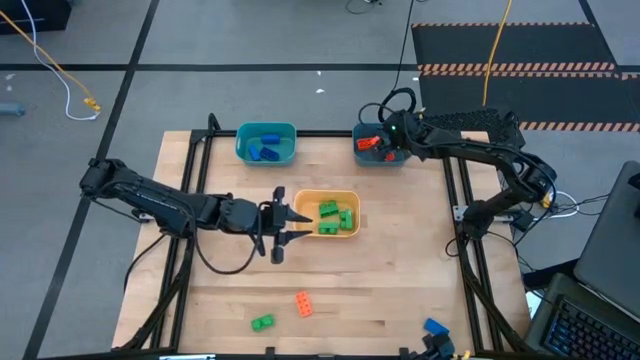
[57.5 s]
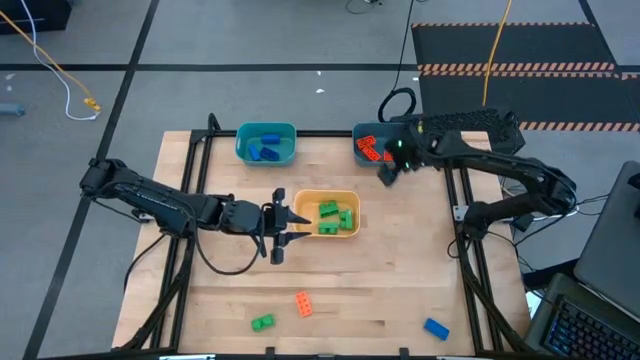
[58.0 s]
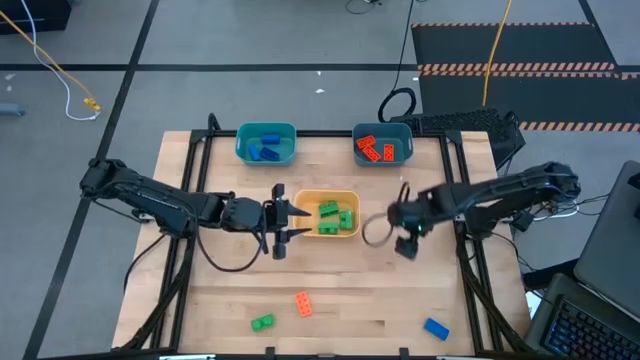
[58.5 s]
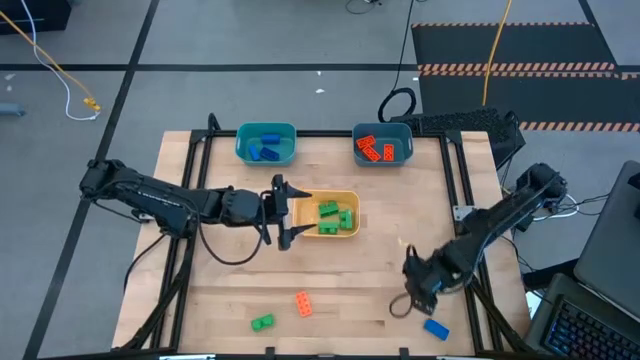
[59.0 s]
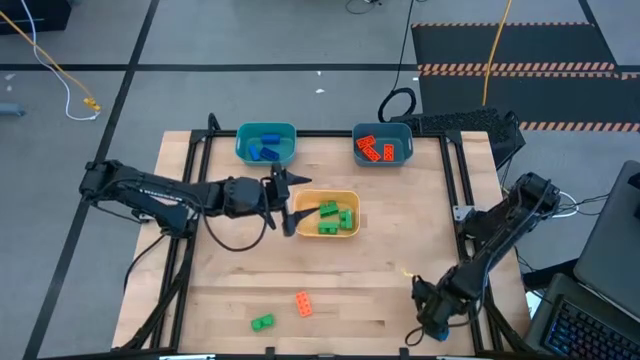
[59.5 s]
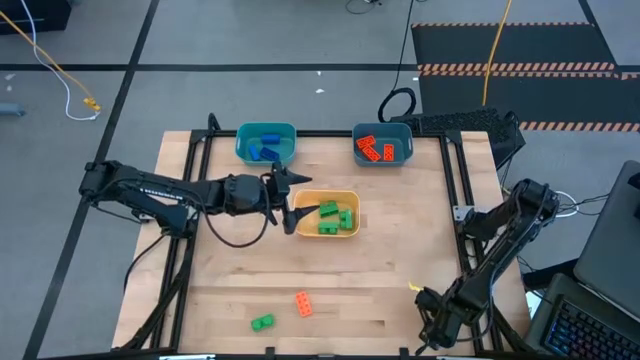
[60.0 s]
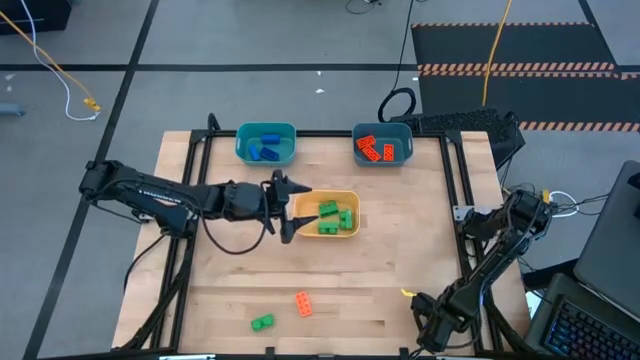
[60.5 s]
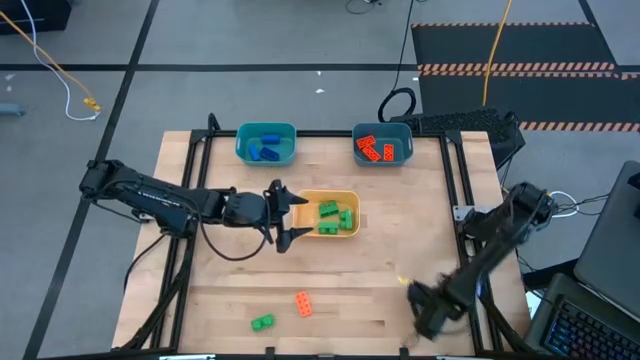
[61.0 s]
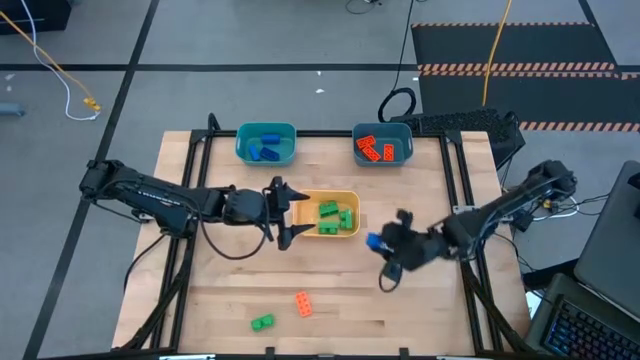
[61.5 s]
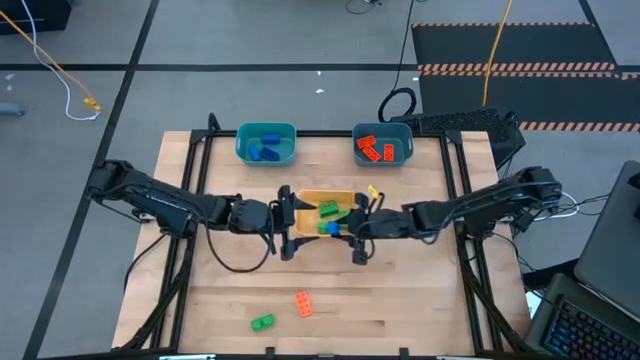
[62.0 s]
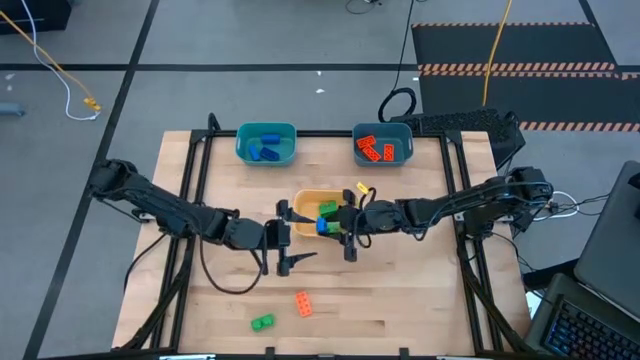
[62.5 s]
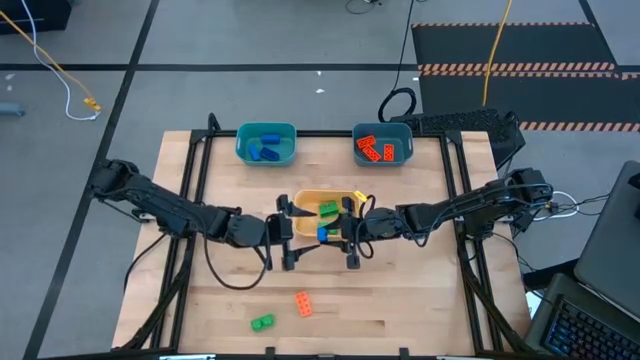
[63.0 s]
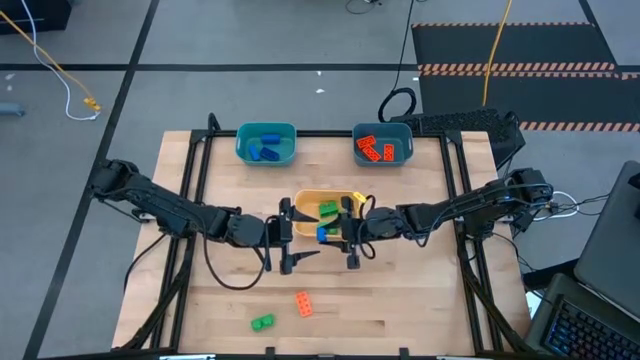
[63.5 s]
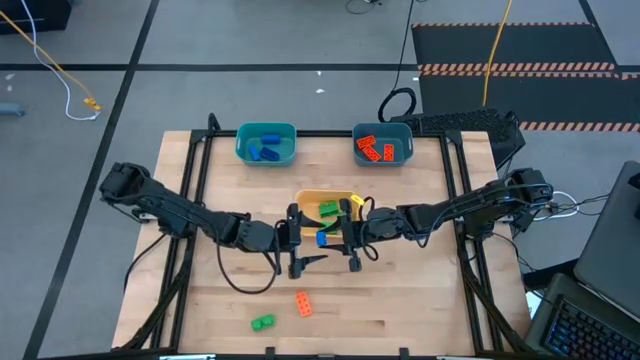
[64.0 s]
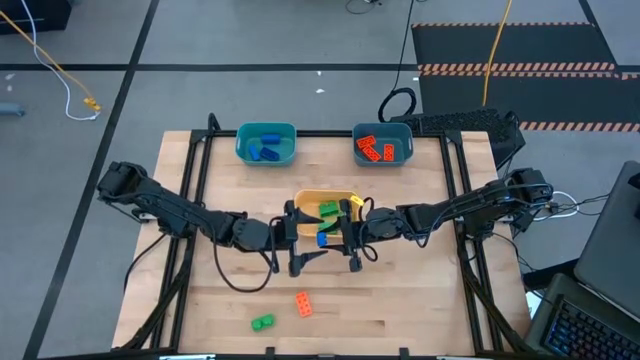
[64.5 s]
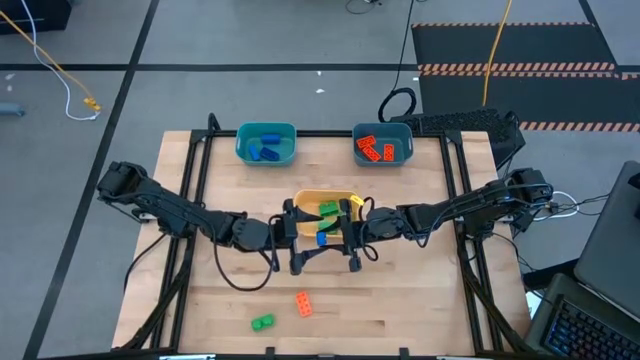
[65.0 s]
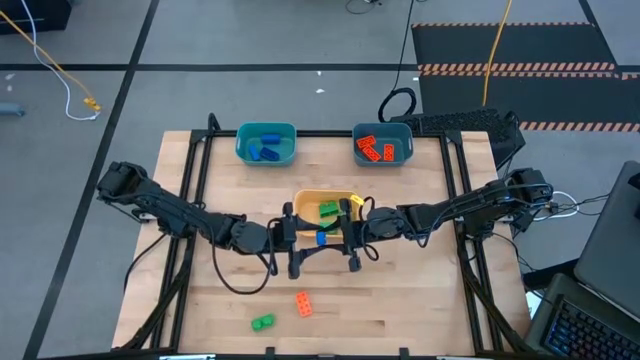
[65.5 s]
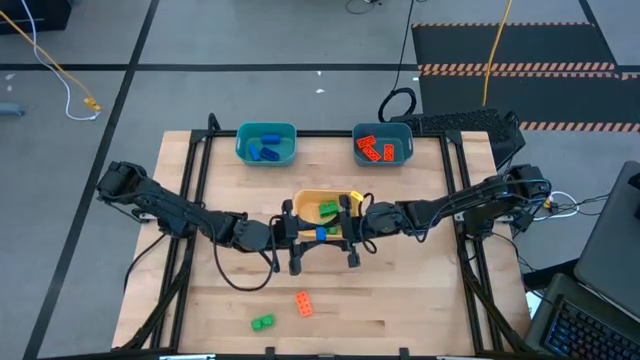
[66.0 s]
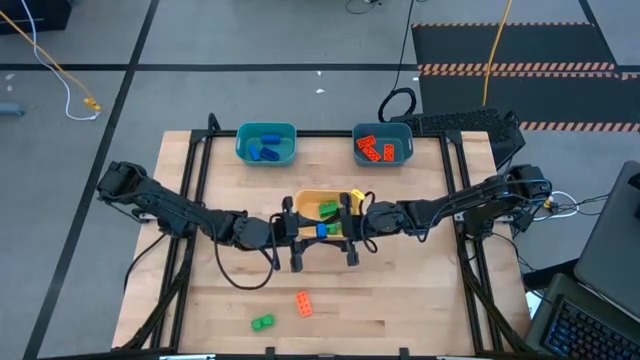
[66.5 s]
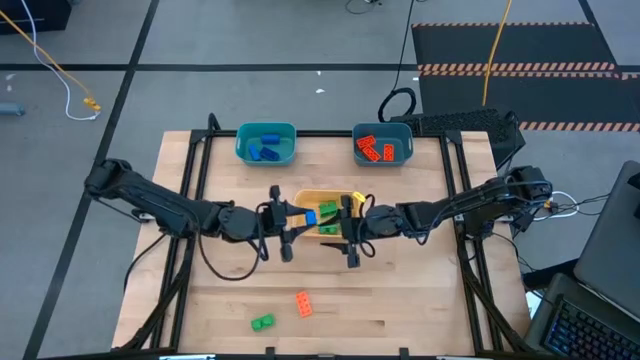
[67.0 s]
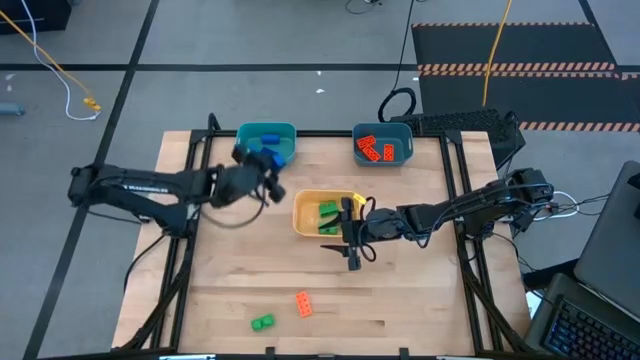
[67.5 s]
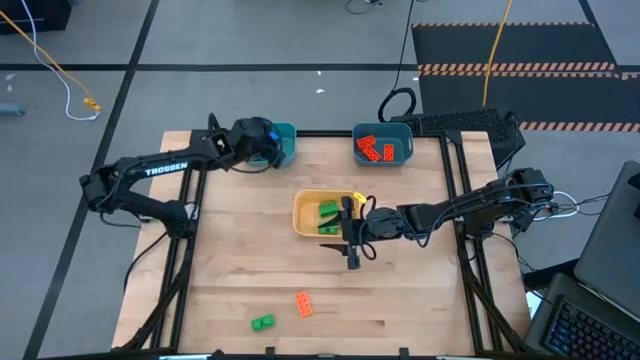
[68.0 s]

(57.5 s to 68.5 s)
Task: Sort & place blocks by color
Put the blue game piece into the green bin

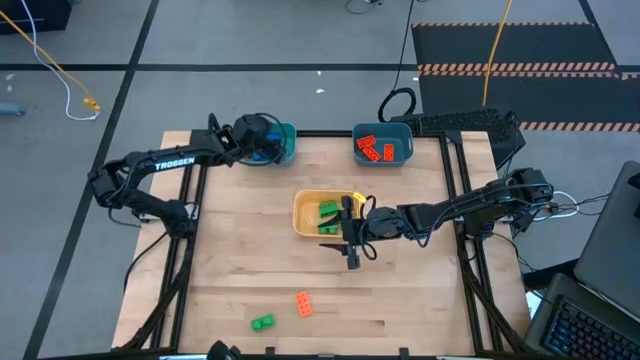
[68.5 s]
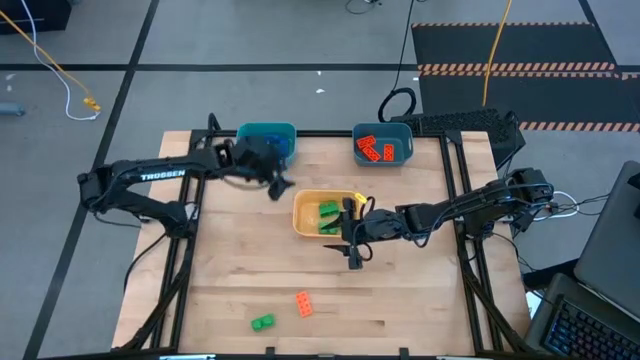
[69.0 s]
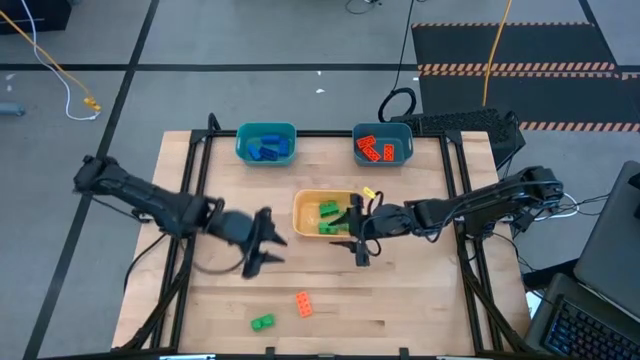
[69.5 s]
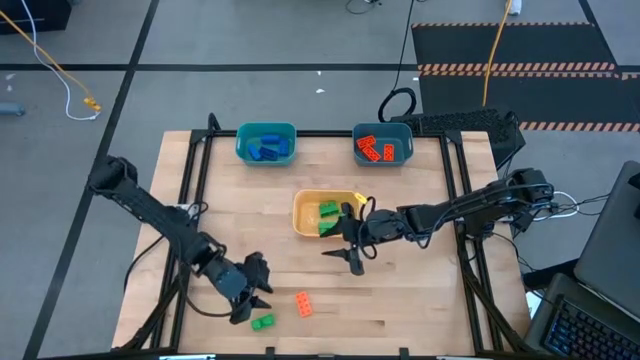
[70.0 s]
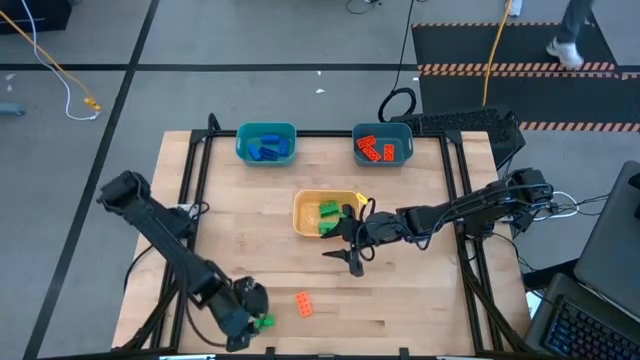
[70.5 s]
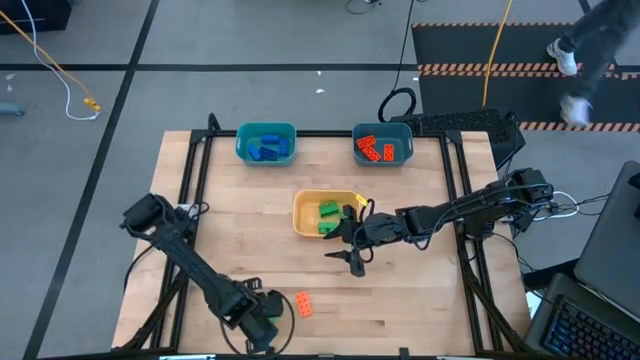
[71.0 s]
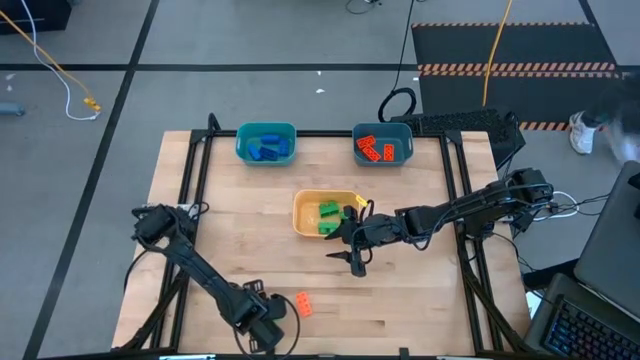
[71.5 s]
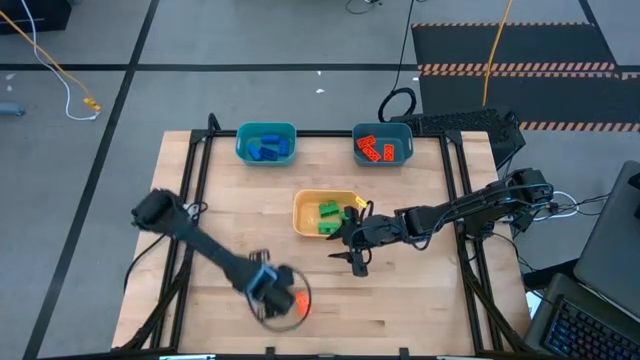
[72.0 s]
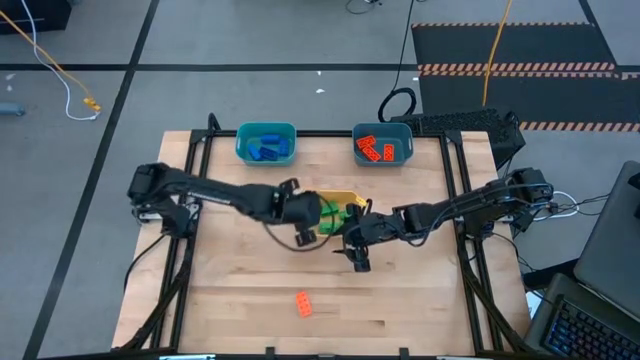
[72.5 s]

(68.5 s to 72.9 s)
Put the green game piece into the yellow bin

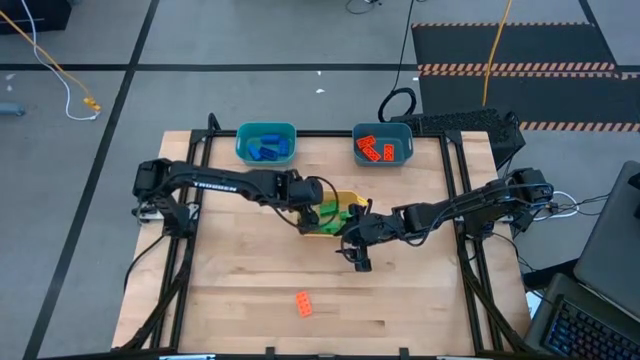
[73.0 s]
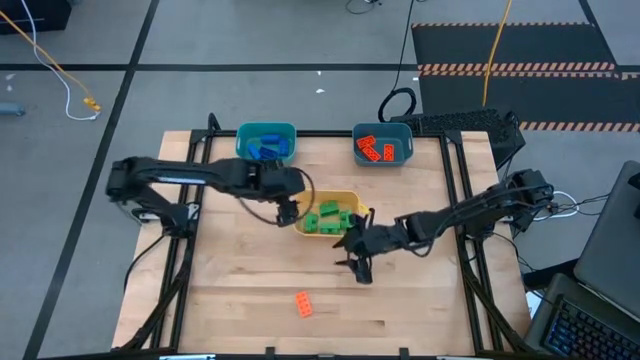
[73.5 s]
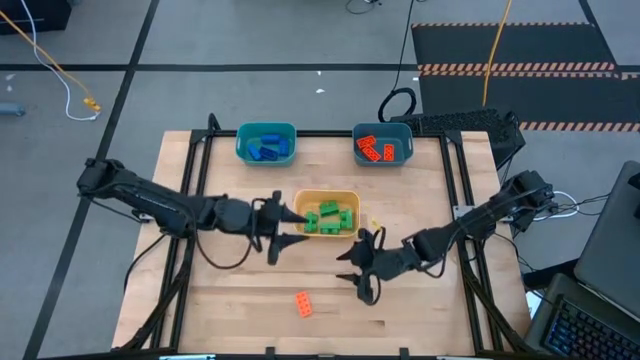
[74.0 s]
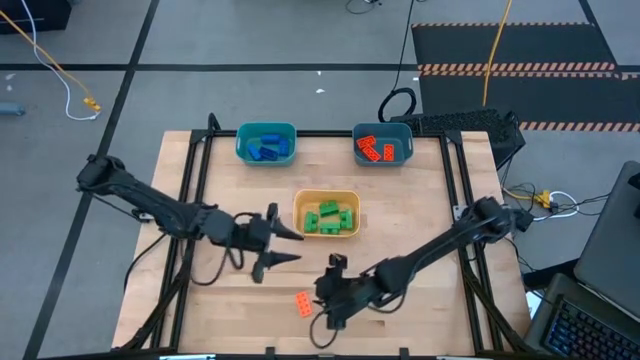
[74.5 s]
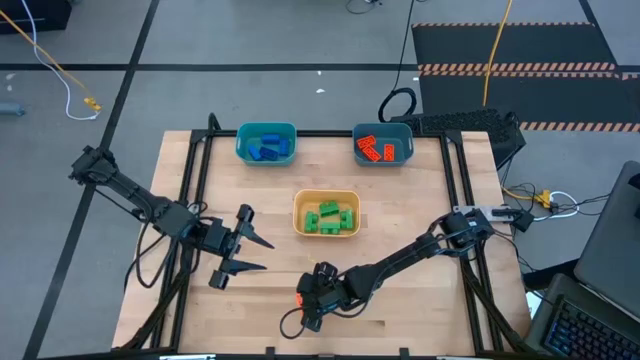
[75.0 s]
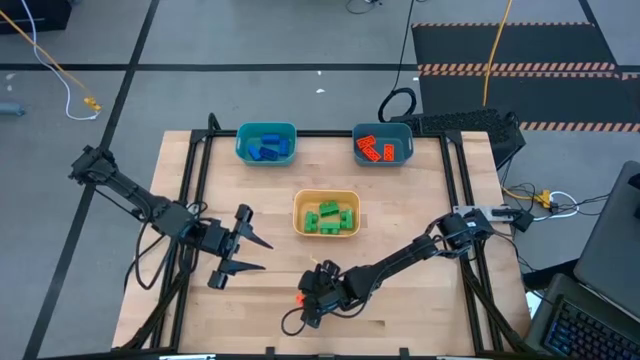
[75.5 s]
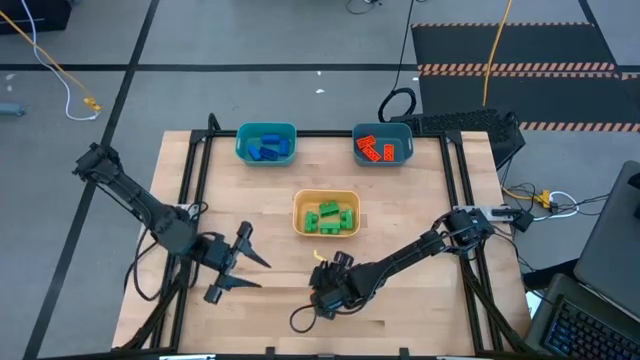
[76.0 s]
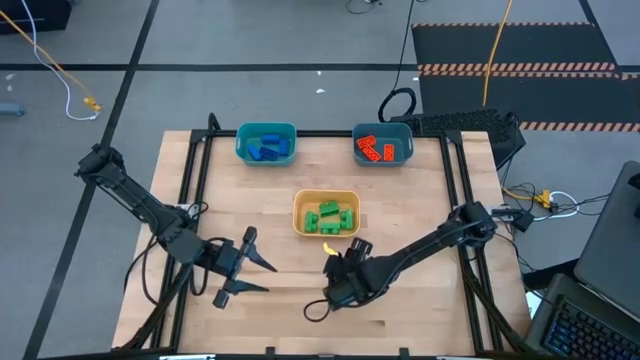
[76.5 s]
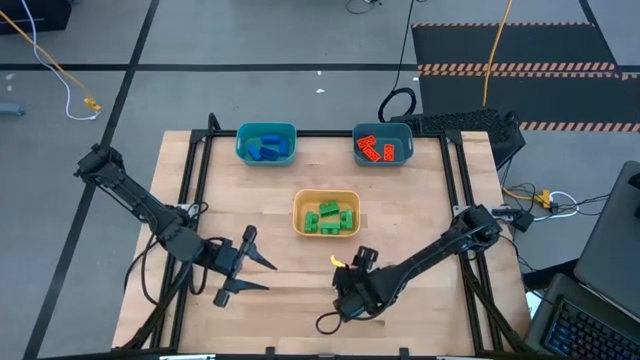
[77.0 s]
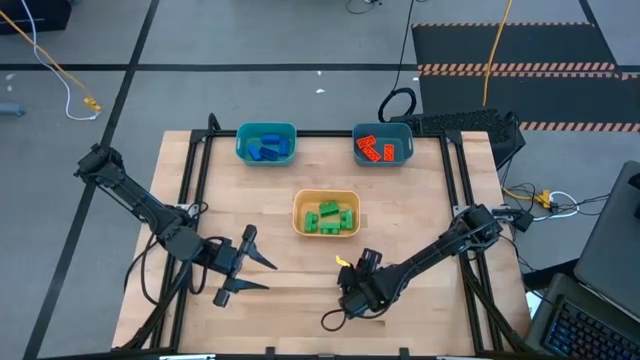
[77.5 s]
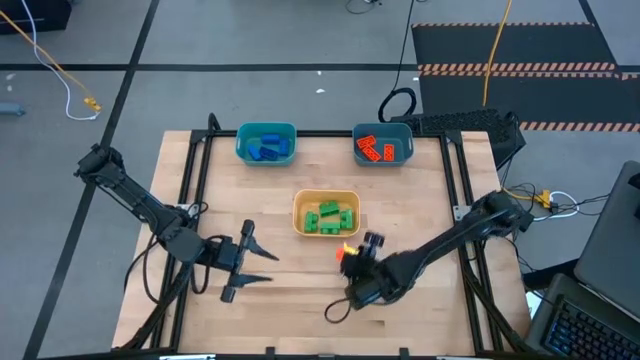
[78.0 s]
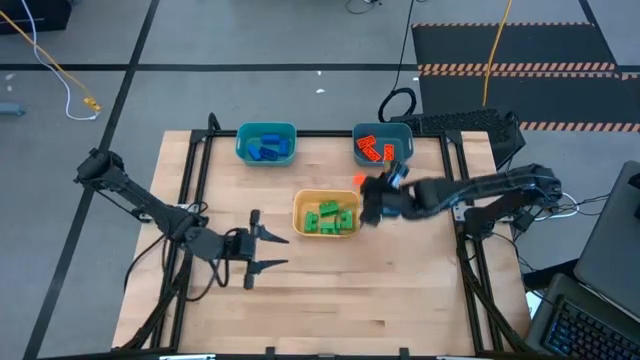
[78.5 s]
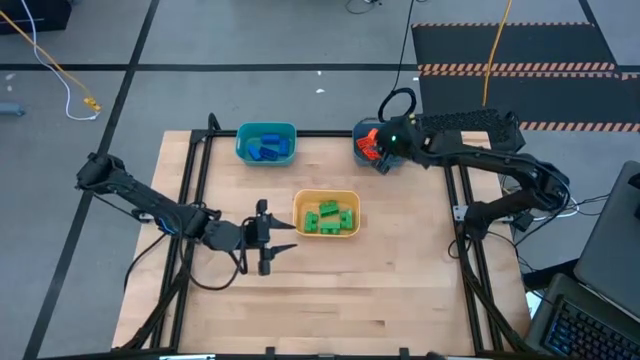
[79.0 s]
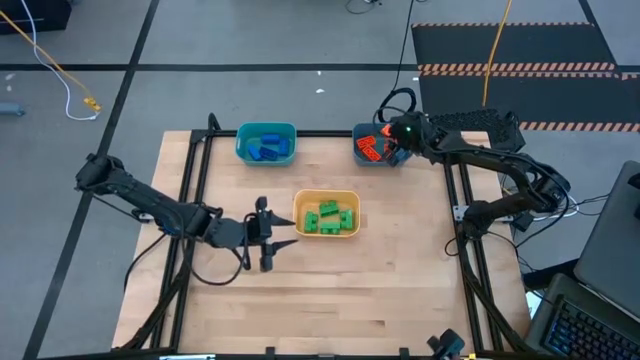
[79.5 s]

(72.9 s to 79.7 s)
Put the orange game piece into the blue bin
